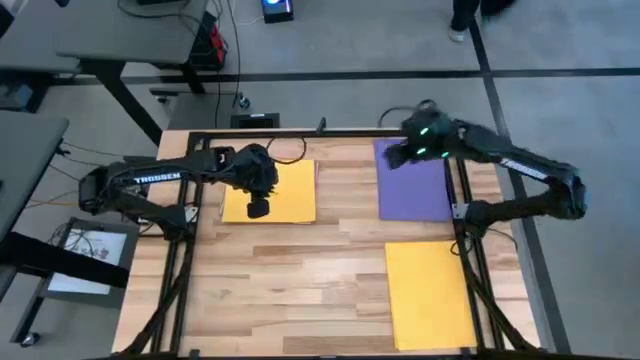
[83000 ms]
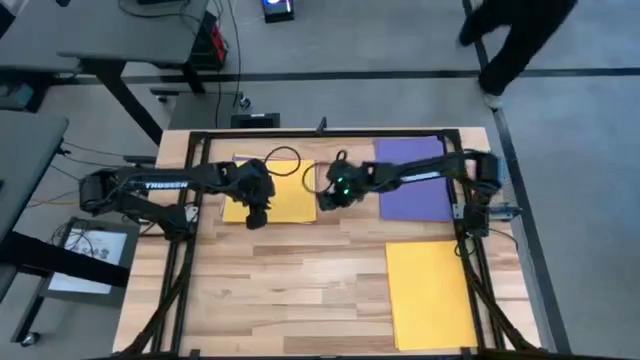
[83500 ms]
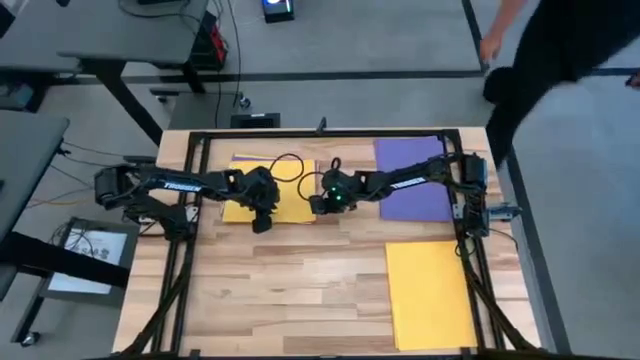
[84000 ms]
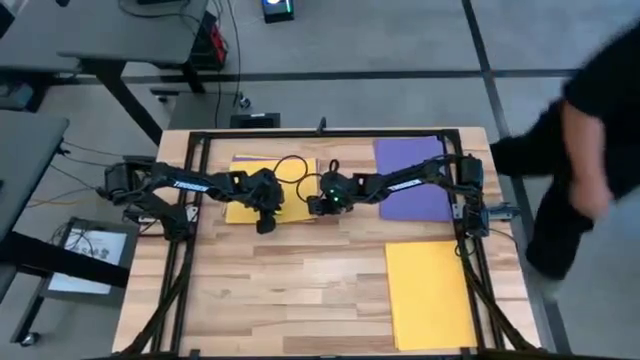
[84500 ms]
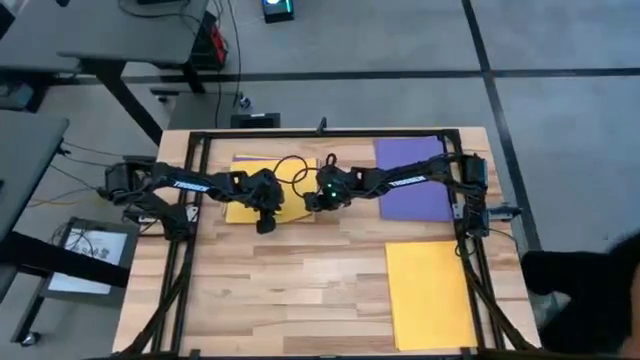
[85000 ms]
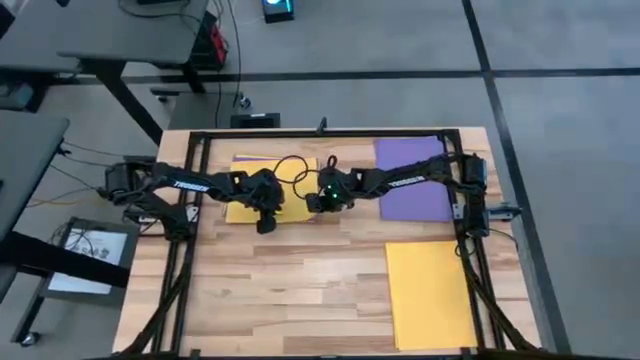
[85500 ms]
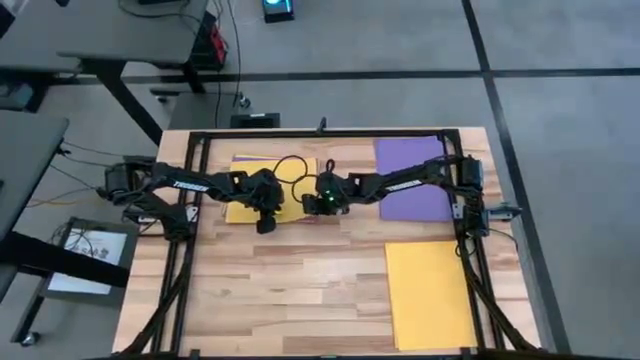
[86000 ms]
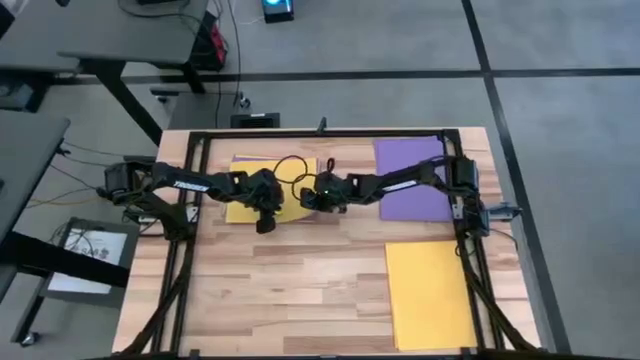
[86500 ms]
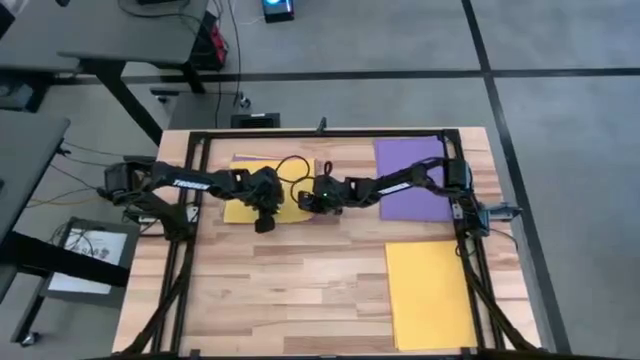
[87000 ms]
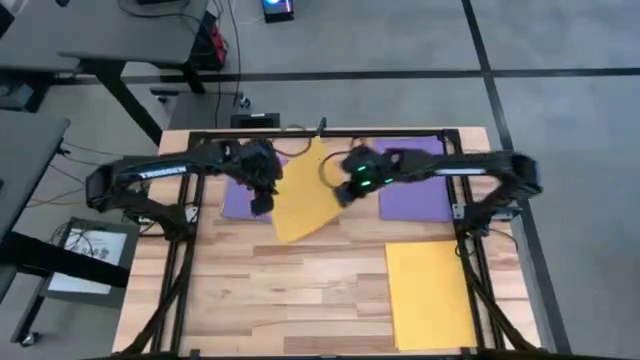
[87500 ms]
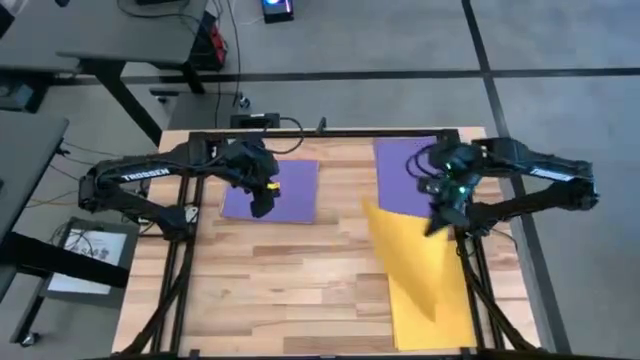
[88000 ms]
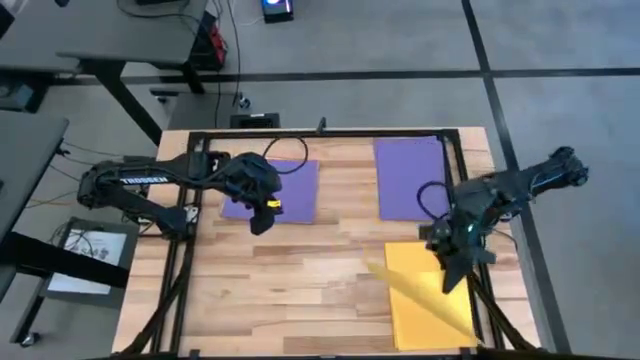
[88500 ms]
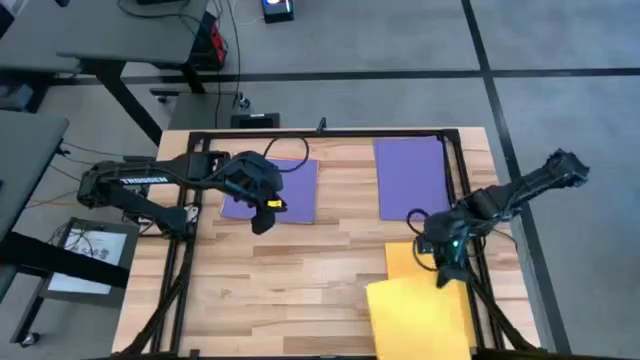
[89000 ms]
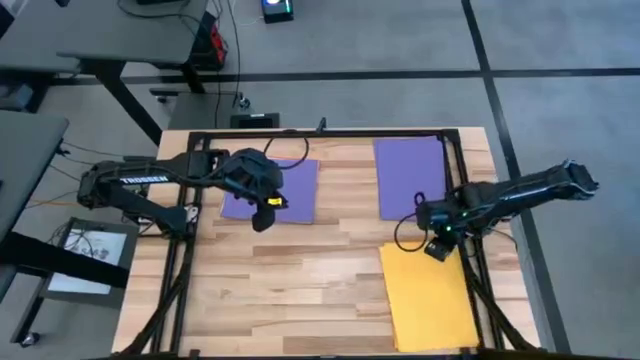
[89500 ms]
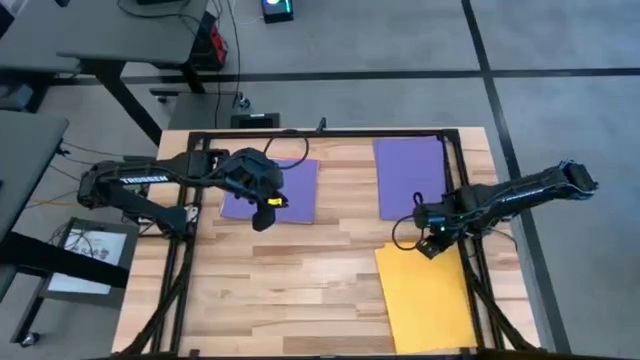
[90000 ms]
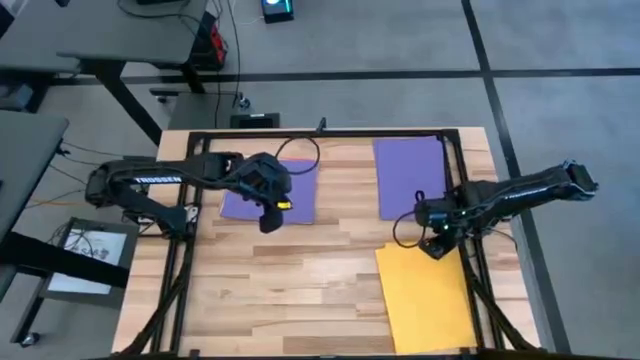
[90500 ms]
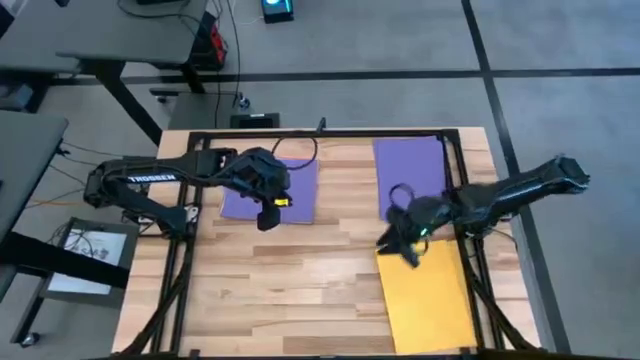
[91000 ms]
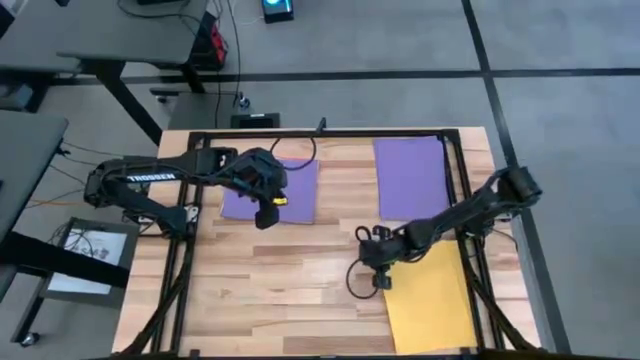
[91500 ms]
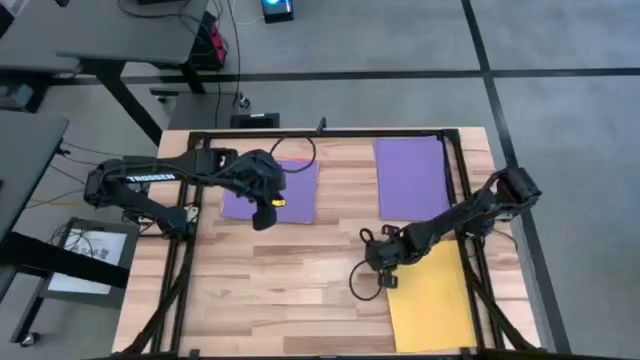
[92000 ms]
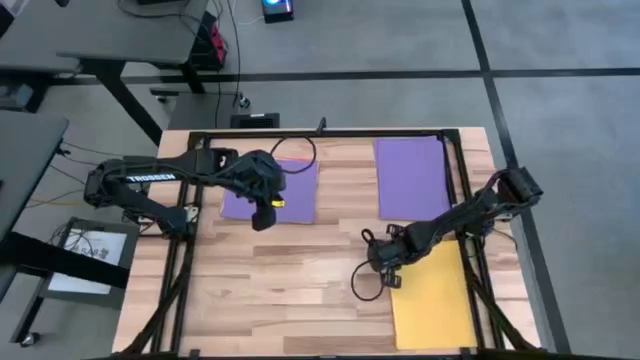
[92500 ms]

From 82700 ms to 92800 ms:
Task: Organize paper
Stack the yellow paper on the bottom right yellow papers

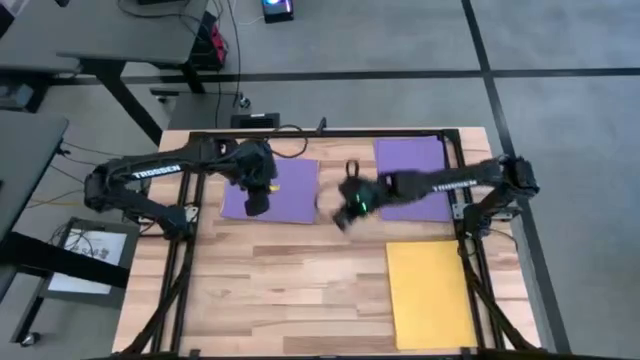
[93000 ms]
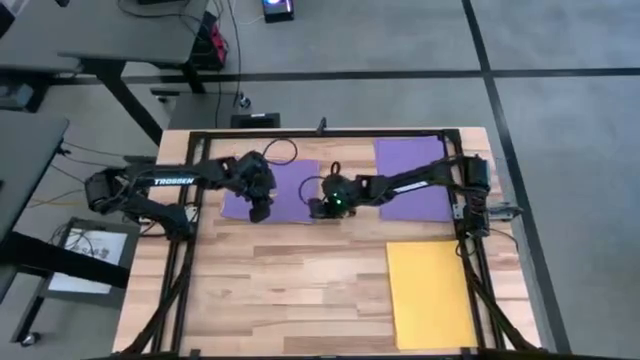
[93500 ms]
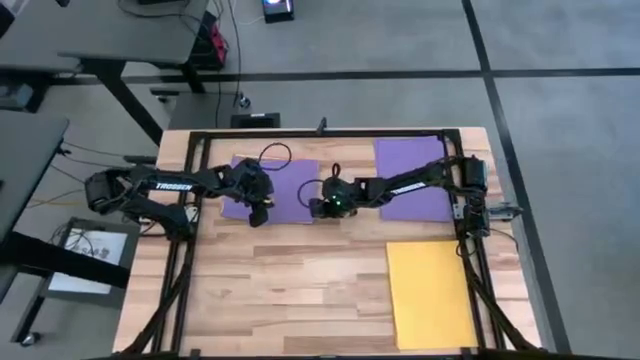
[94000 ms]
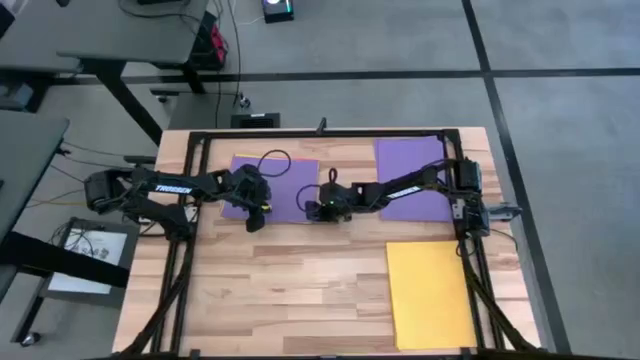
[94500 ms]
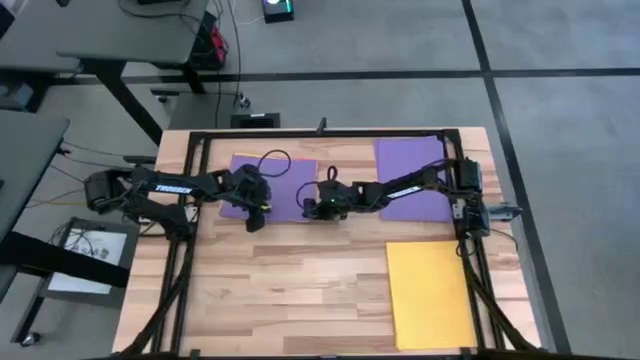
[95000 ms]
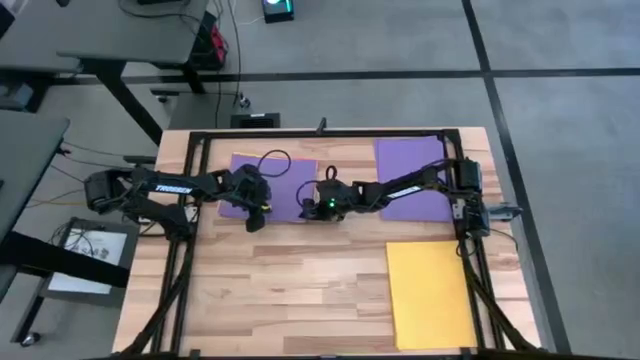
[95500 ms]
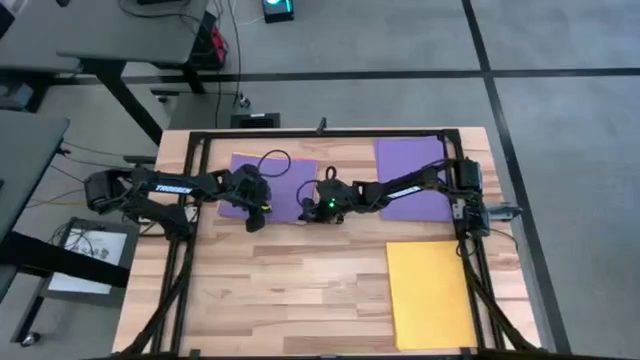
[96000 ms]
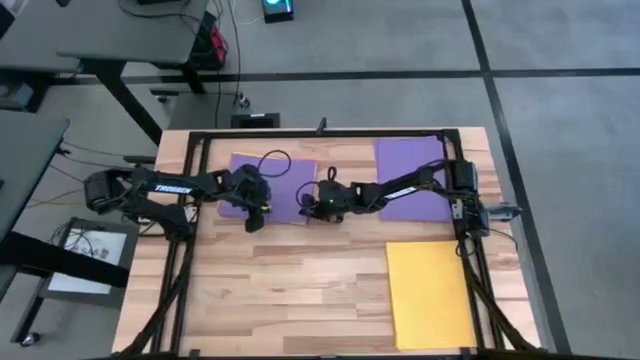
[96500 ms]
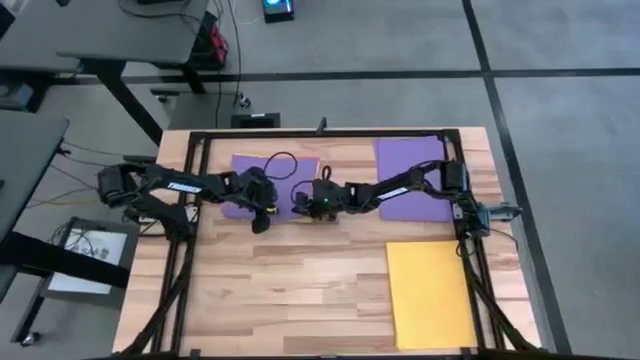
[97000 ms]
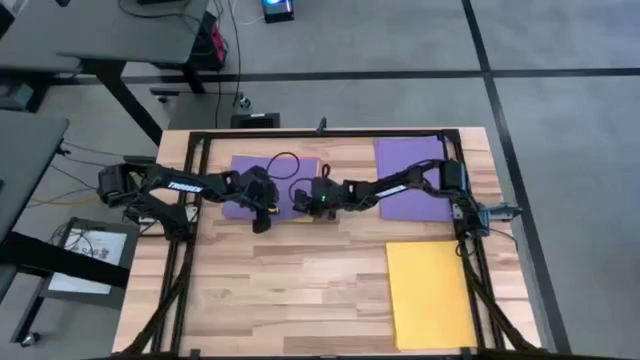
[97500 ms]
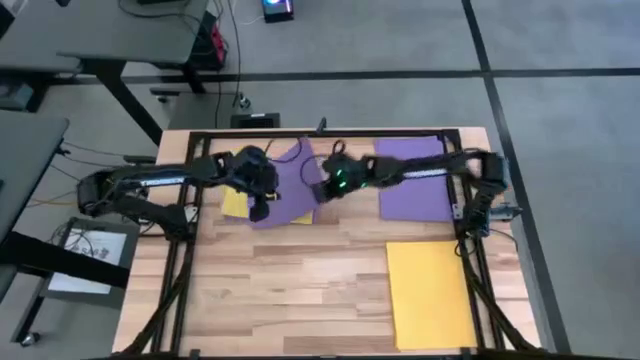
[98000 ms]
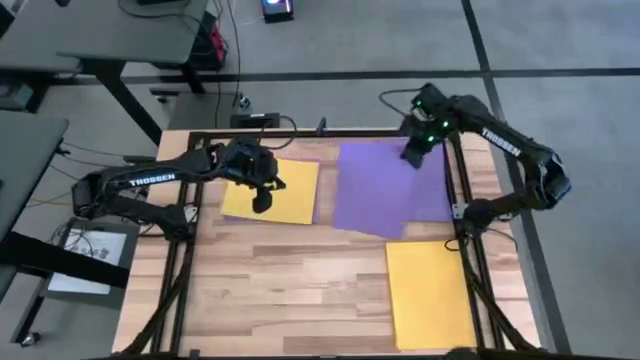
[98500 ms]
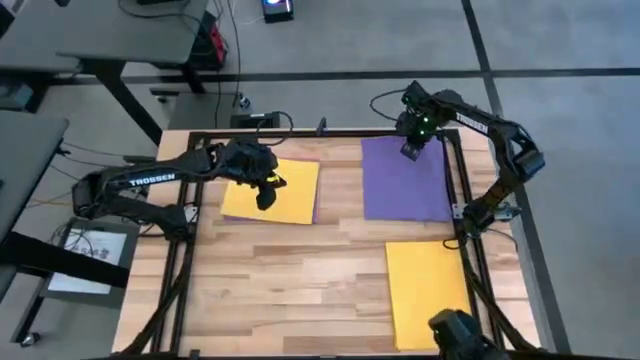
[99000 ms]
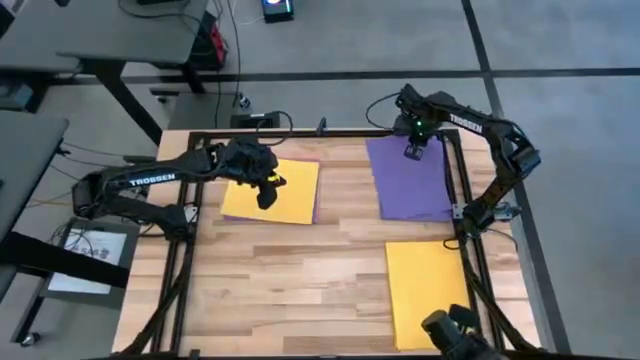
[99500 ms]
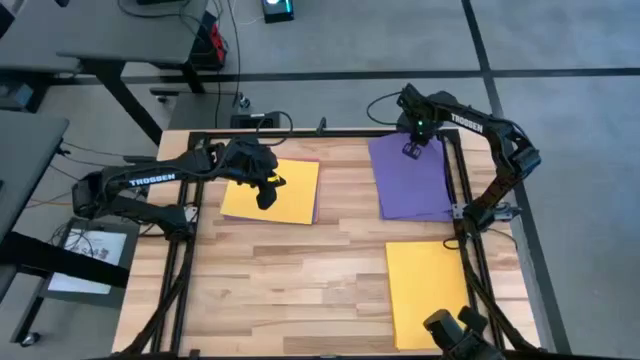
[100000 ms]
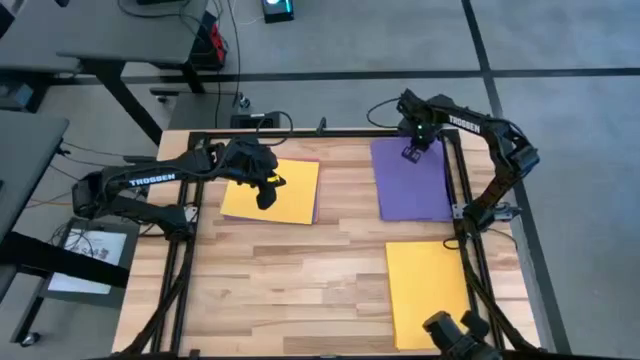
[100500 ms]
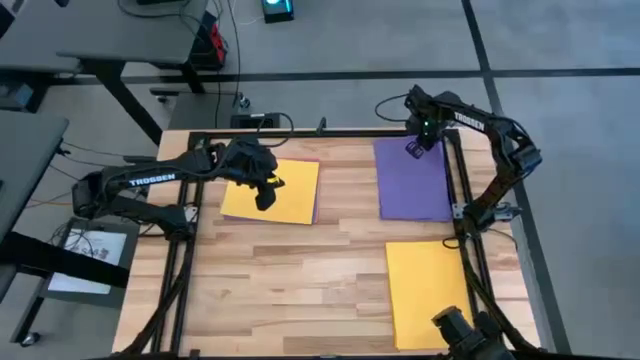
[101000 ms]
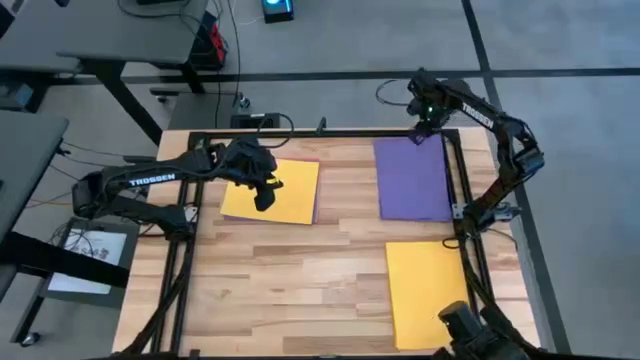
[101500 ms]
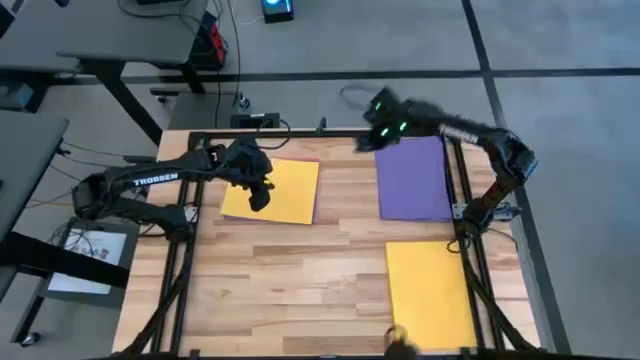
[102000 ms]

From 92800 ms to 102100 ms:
Stack the purple paper on the top right purple papers

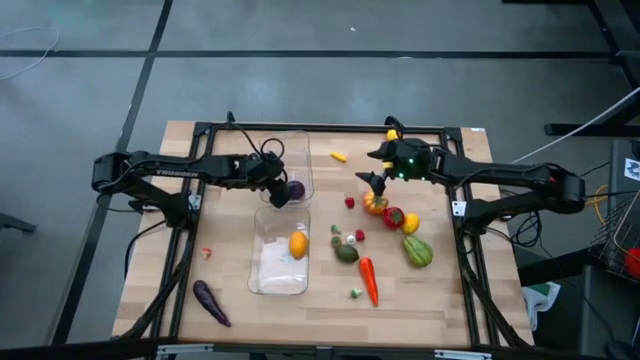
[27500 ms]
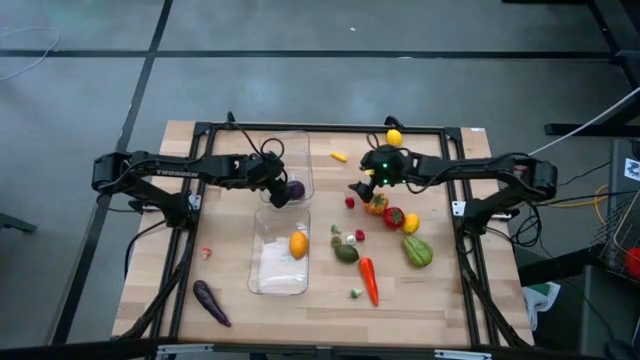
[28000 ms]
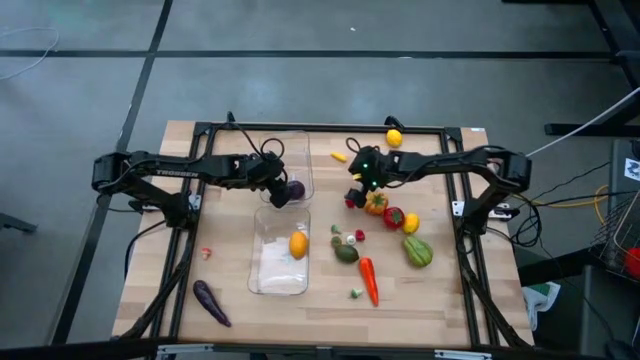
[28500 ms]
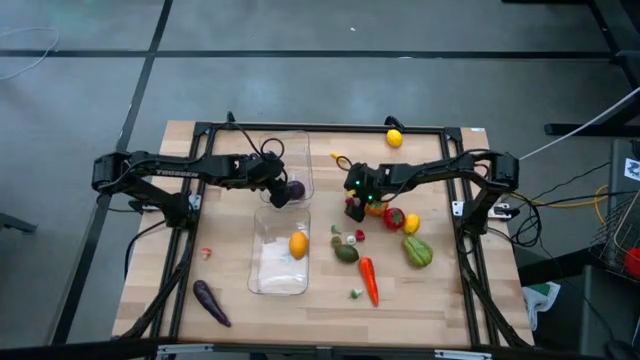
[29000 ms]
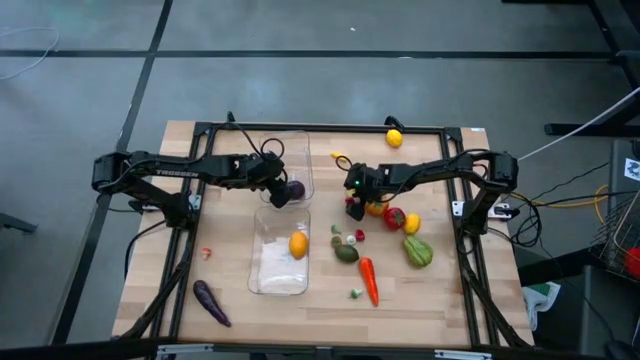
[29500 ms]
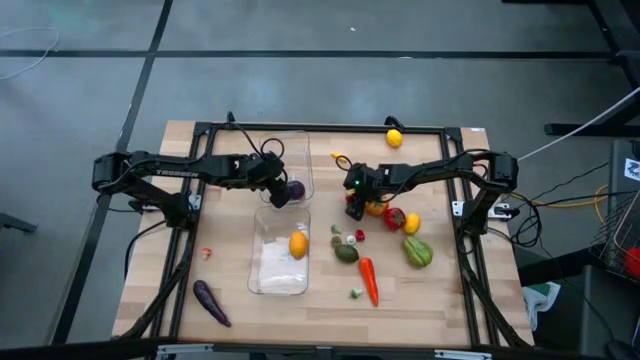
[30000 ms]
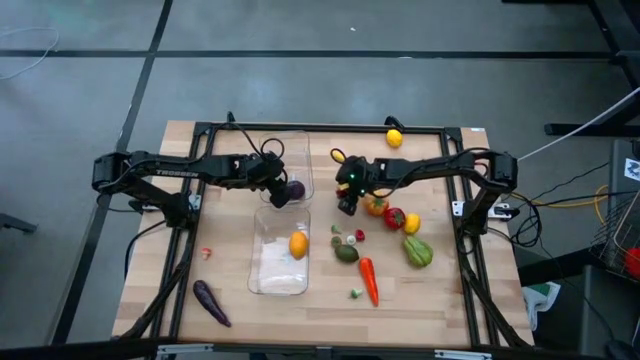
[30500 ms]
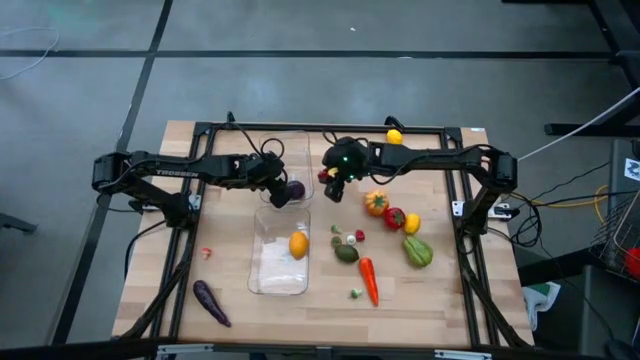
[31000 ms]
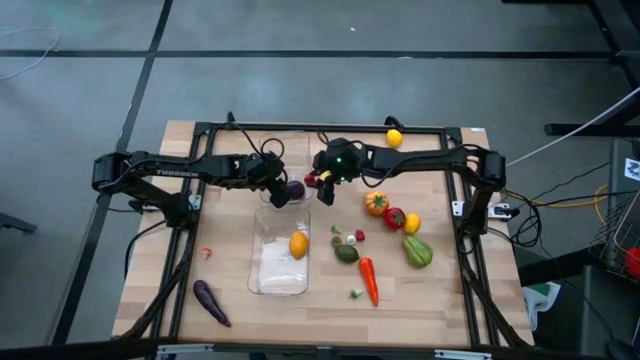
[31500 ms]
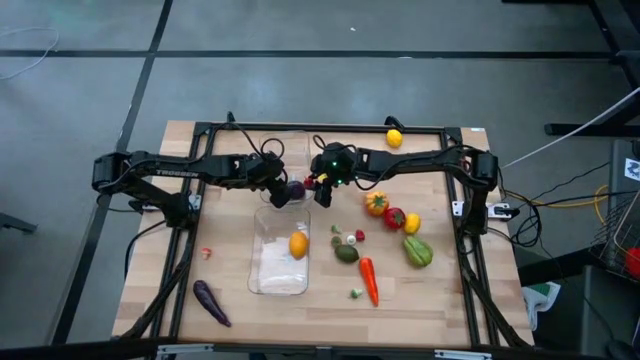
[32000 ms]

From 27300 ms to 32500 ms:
Task: Sort produce into baskets
Put the red bell pepper into the top transparent bin
